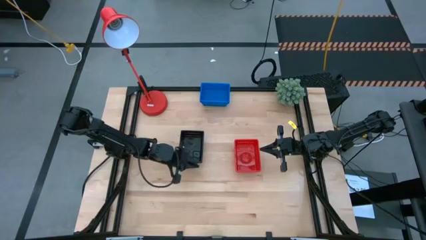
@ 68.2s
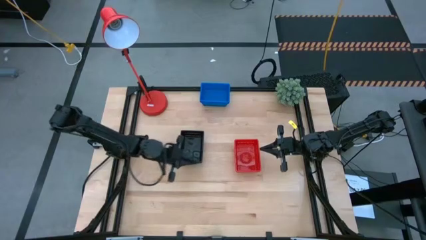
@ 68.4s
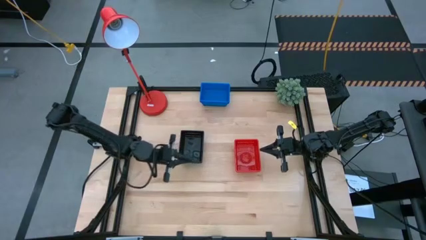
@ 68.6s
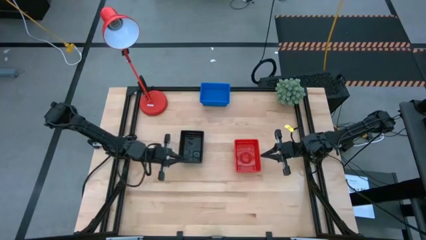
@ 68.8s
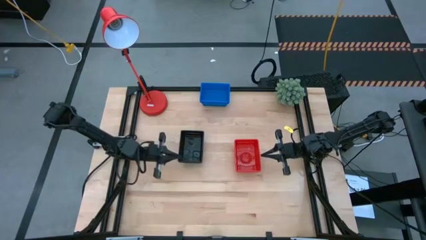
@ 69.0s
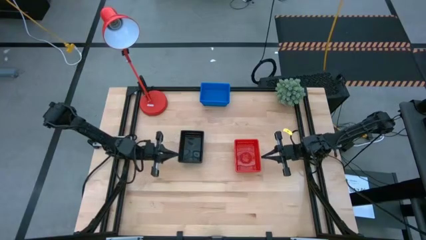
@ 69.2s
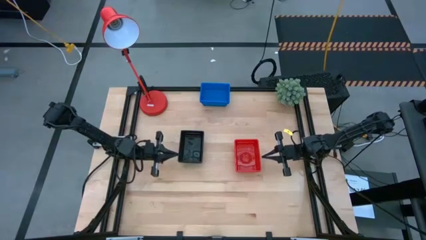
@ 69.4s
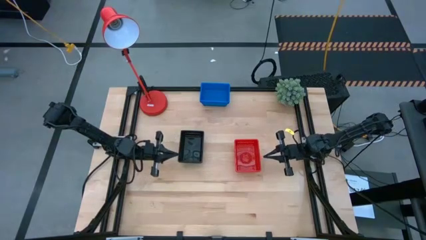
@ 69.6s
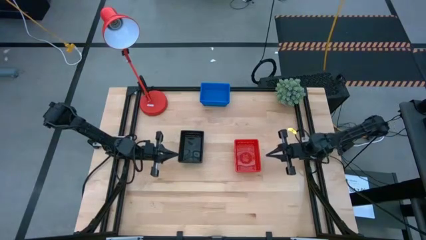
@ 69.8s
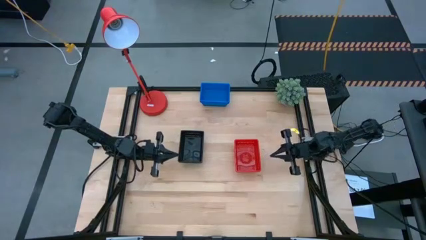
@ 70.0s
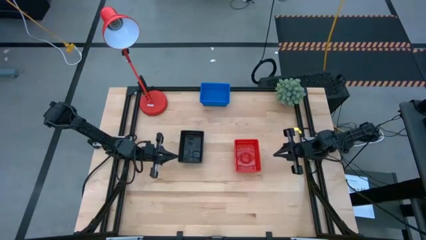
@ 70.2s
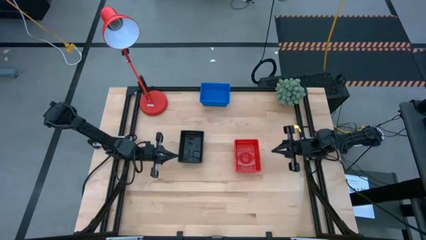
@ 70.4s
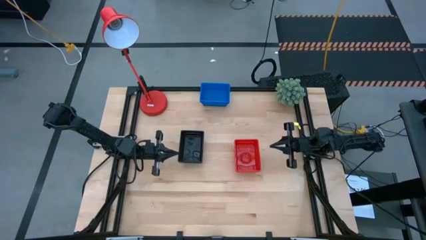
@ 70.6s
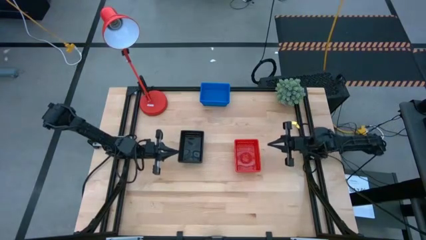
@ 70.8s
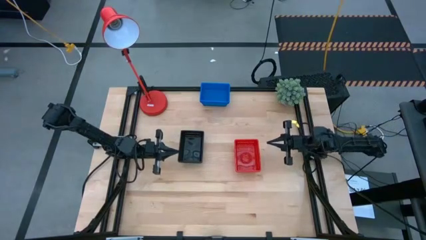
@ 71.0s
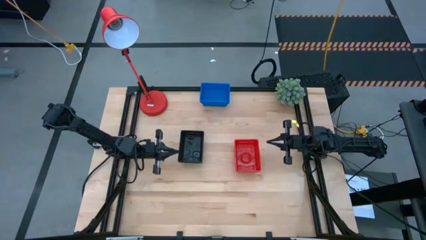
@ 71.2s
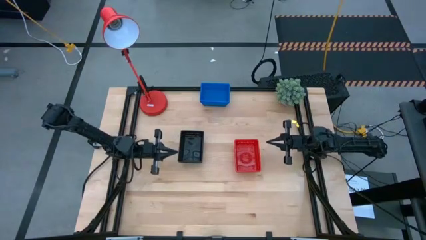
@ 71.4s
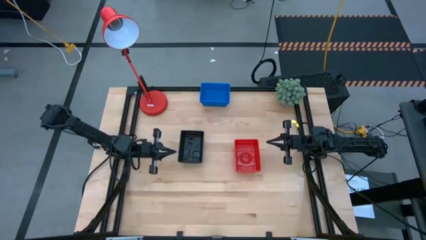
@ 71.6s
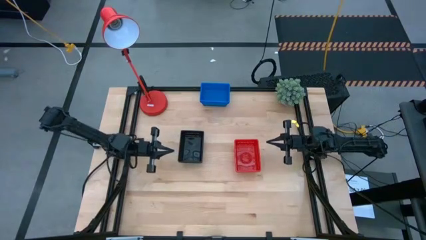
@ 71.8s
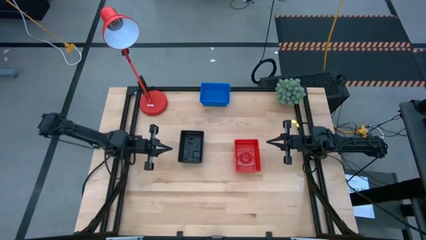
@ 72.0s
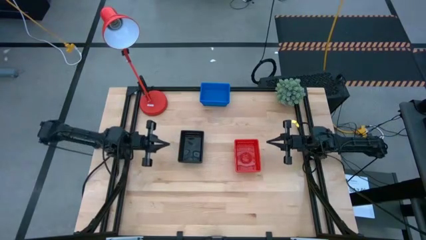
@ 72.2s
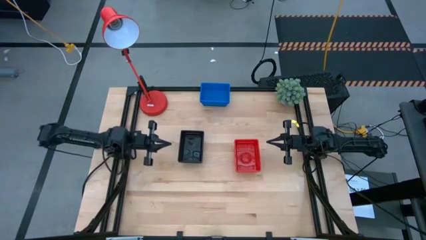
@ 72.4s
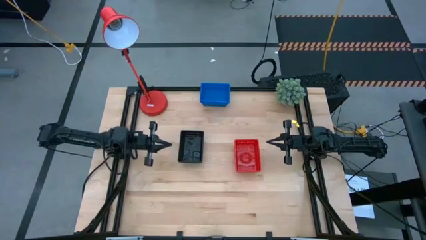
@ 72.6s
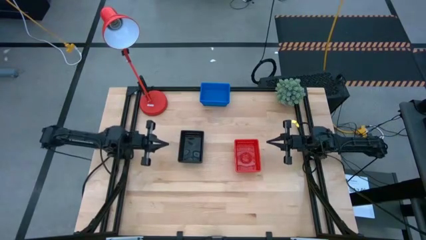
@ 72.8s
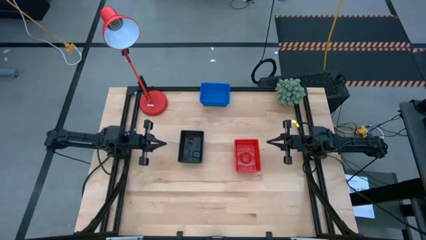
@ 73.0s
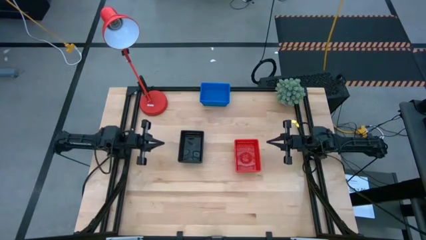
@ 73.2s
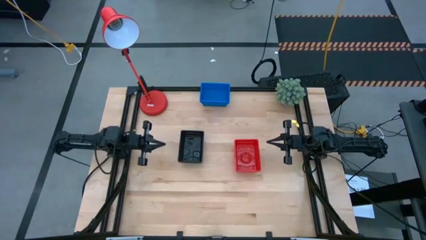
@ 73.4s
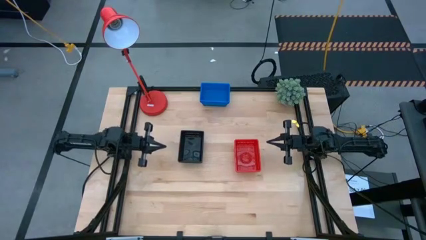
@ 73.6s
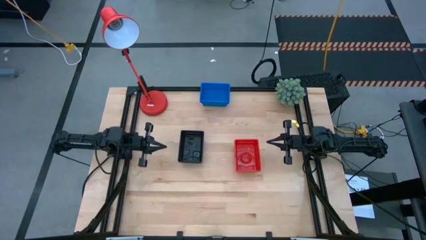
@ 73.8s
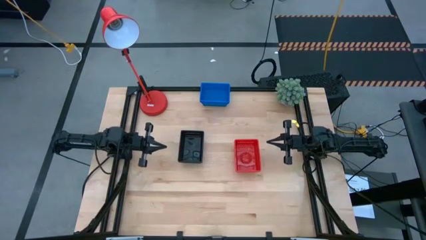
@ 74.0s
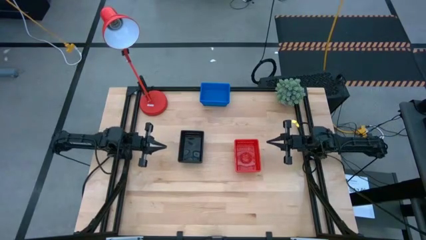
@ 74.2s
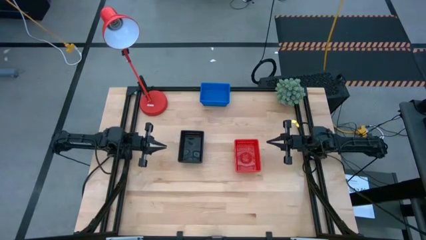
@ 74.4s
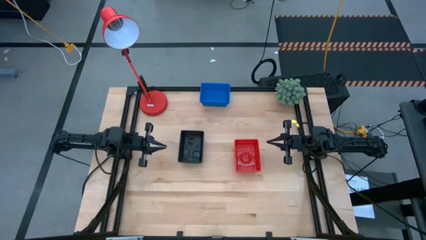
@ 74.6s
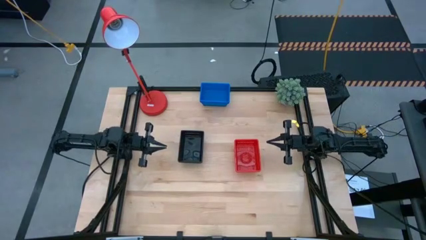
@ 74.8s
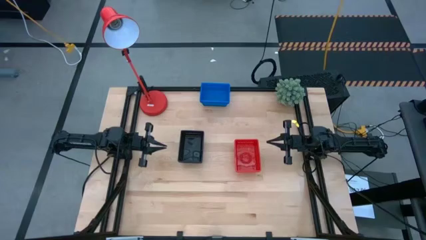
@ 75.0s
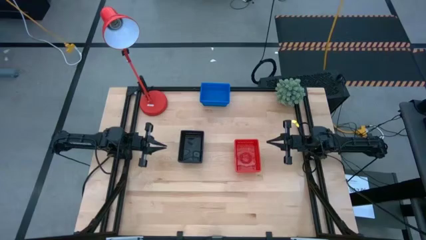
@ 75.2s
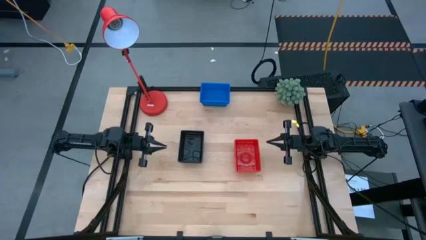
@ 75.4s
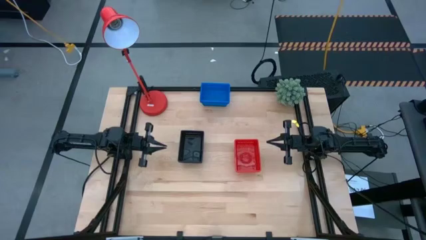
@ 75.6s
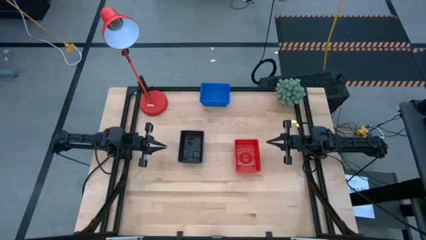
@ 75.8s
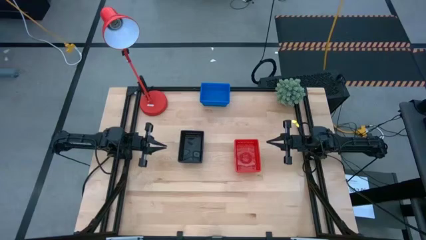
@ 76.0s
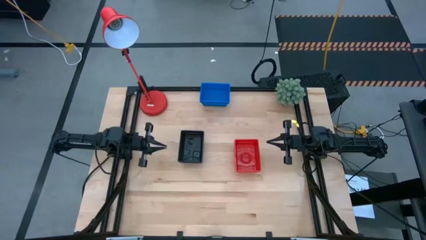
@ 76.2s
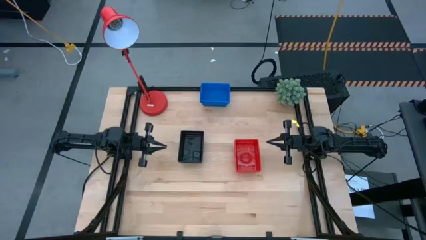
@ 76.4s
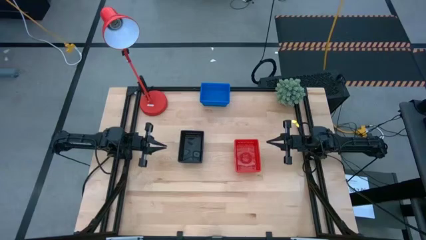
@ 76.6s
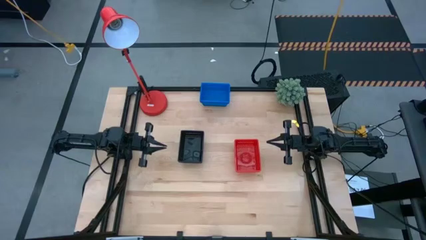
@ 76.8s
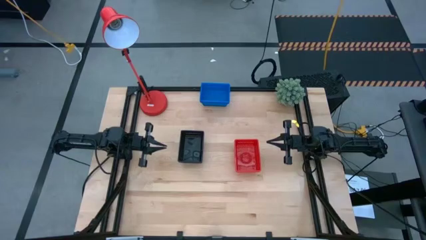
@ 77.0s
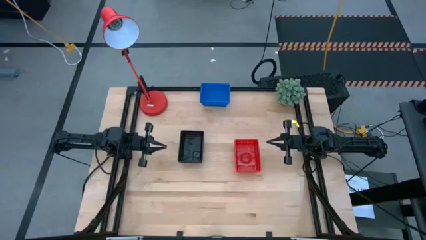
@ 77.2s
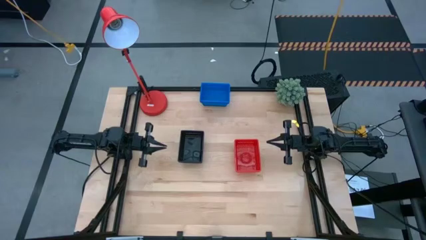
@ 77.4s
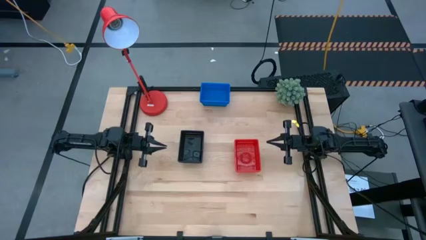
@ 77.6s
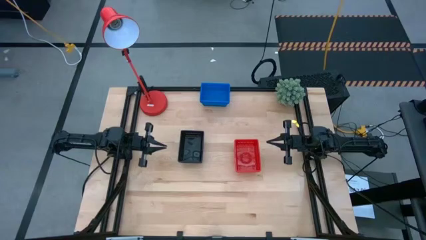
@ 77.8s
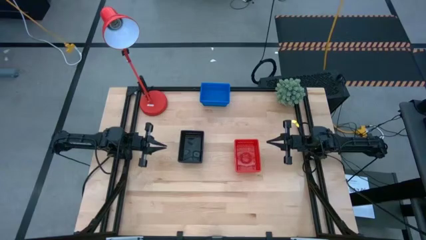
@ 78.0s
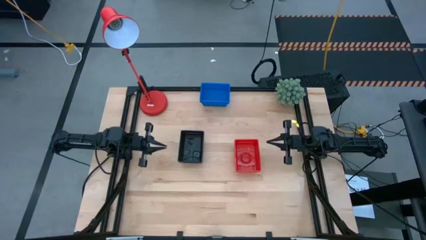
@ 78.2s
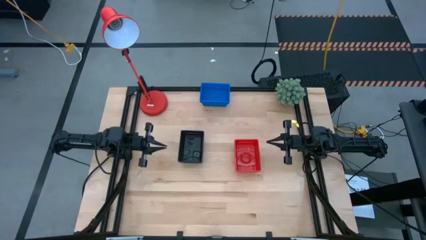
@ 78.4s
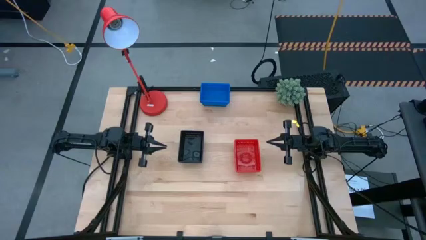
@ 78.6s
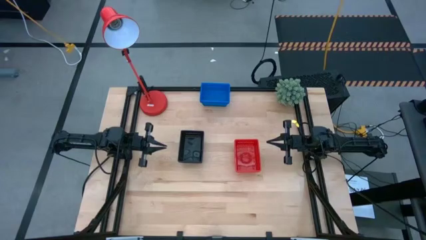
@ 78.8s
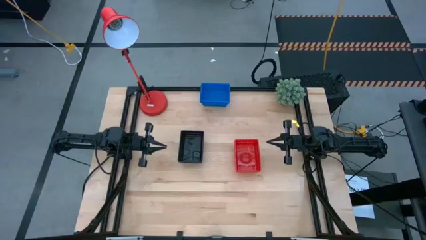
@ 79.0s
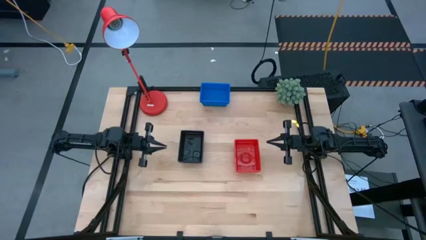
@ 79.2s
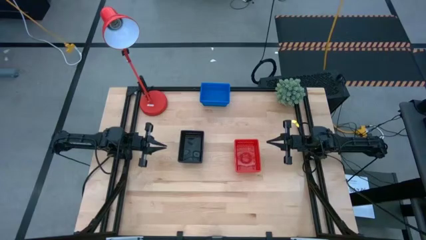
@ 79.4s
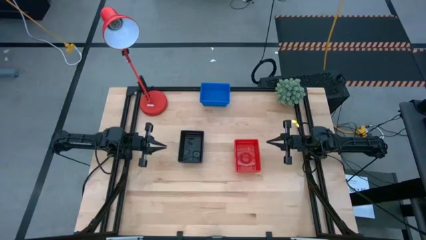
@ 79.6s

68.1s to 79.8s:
Return to Home Position
